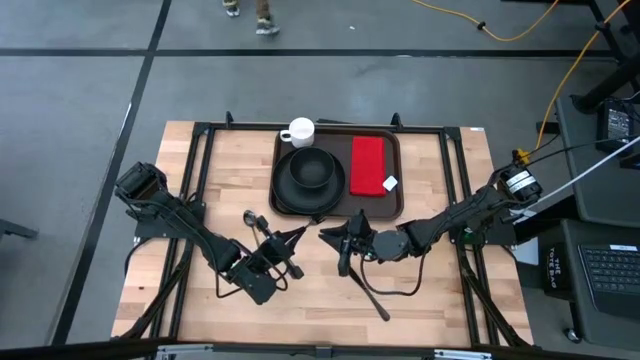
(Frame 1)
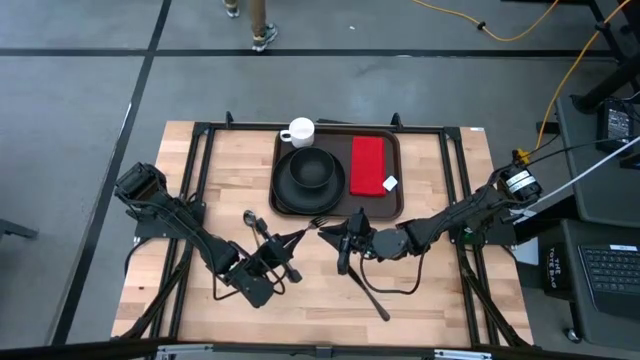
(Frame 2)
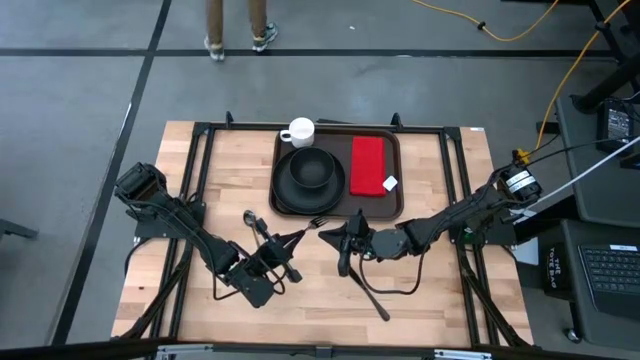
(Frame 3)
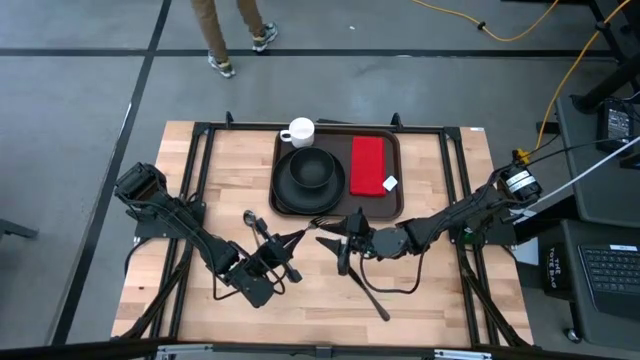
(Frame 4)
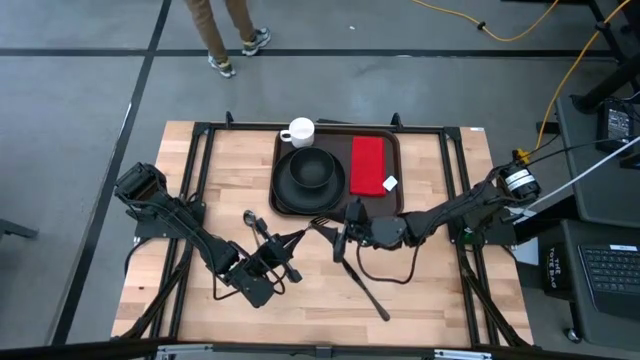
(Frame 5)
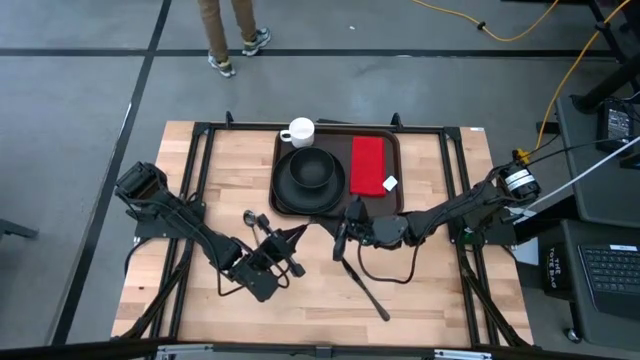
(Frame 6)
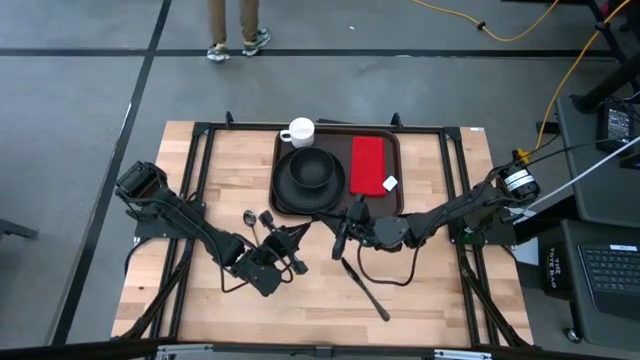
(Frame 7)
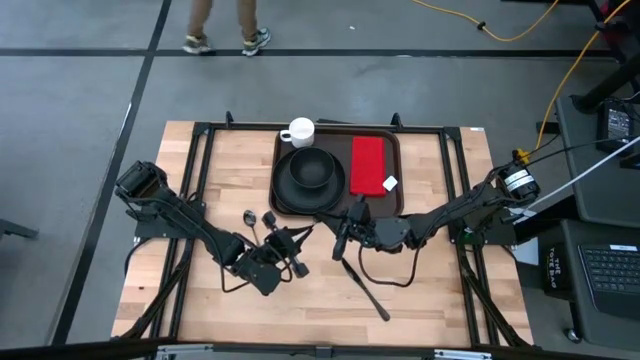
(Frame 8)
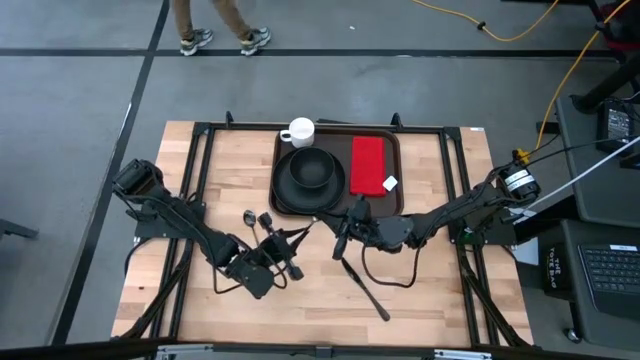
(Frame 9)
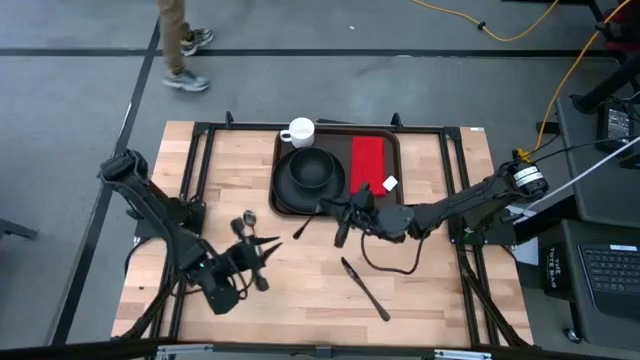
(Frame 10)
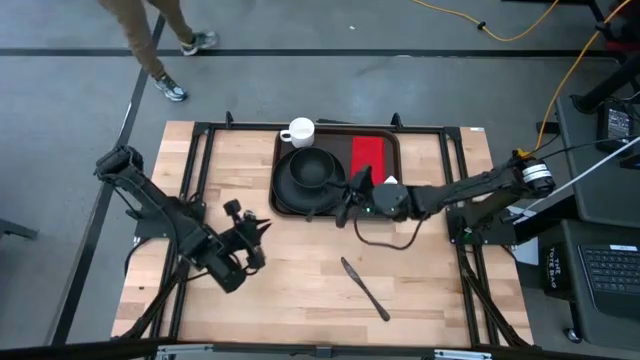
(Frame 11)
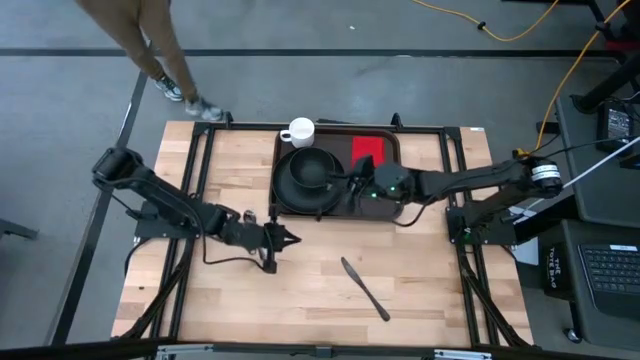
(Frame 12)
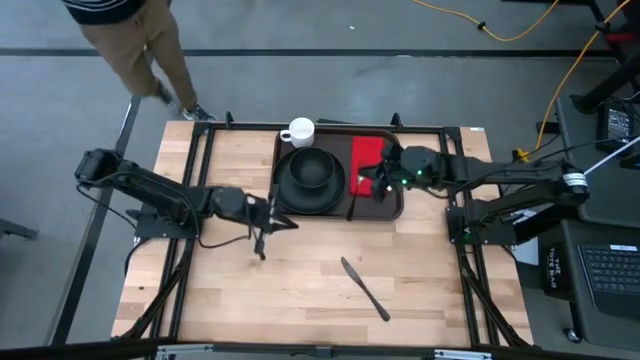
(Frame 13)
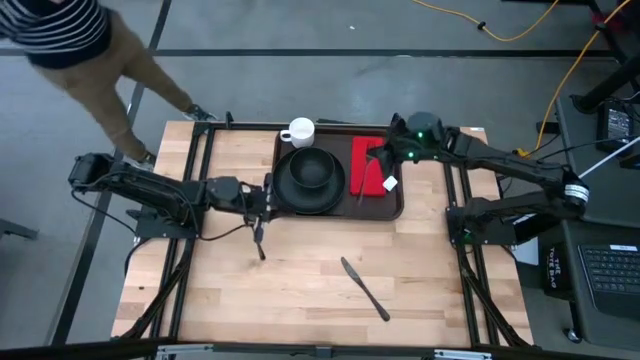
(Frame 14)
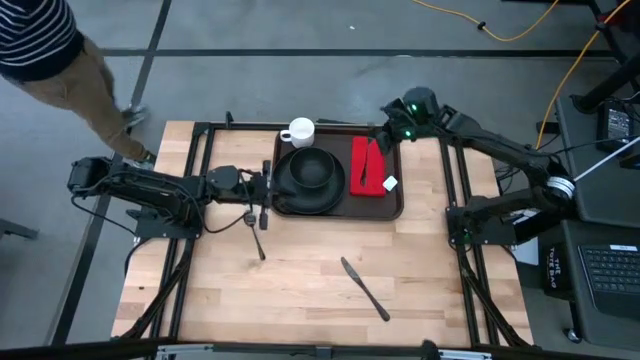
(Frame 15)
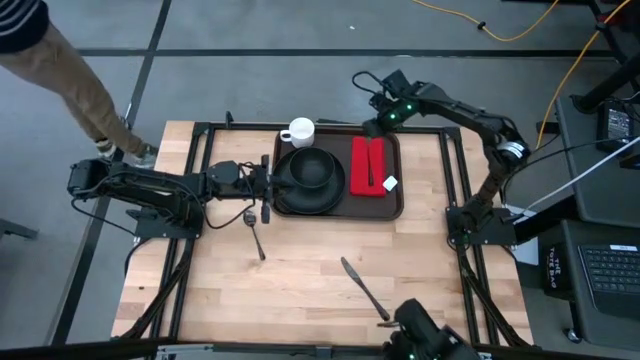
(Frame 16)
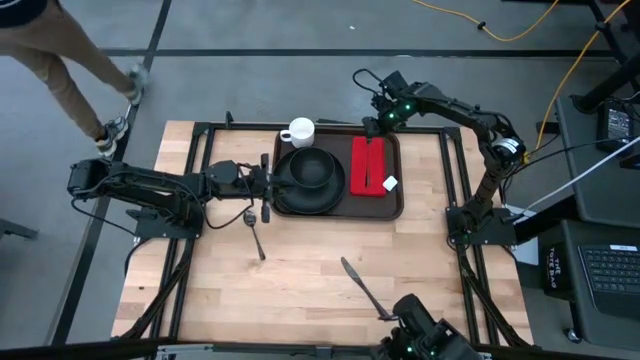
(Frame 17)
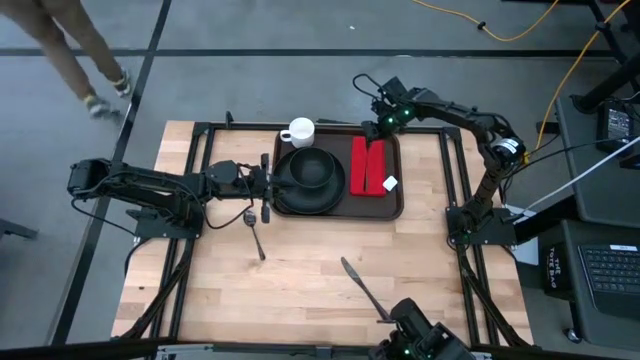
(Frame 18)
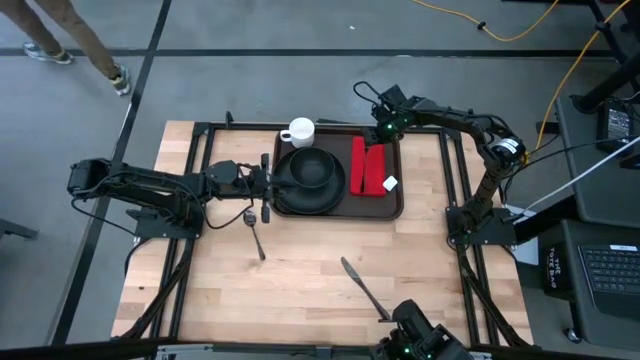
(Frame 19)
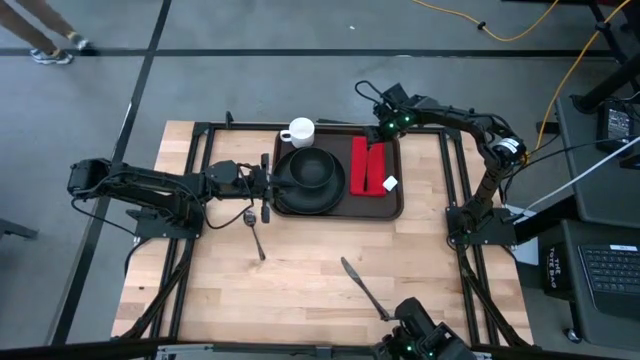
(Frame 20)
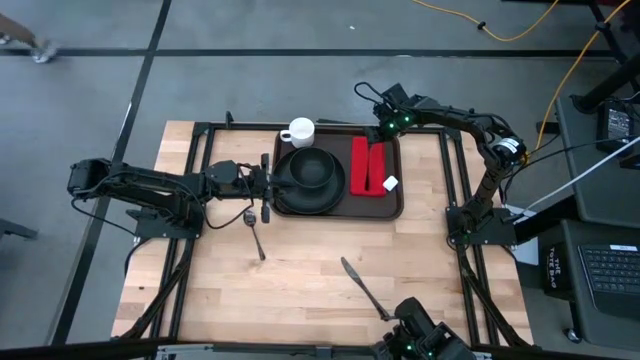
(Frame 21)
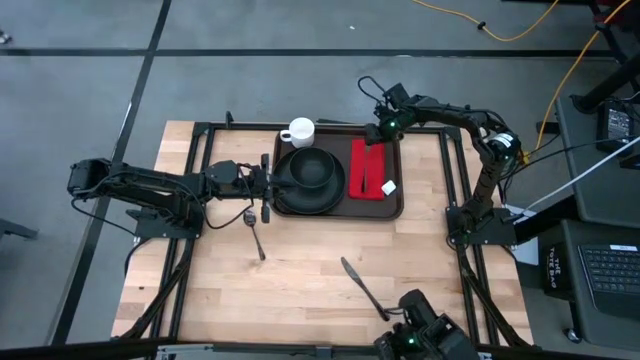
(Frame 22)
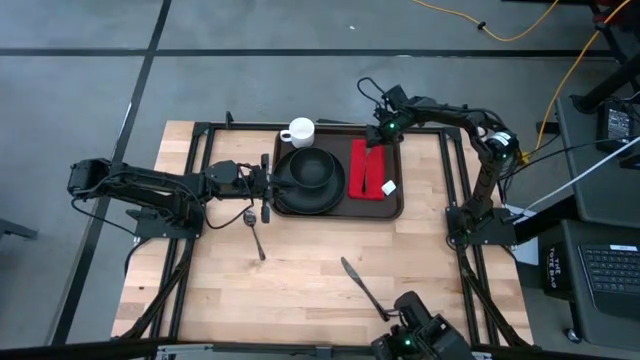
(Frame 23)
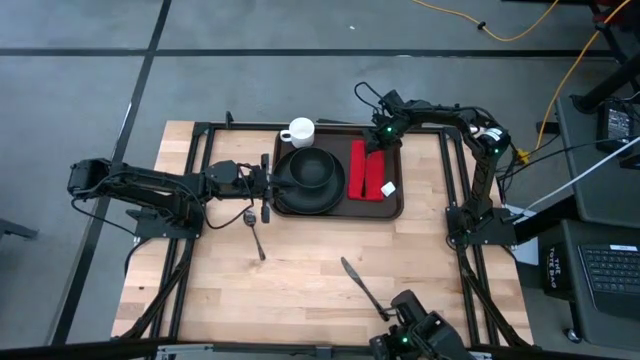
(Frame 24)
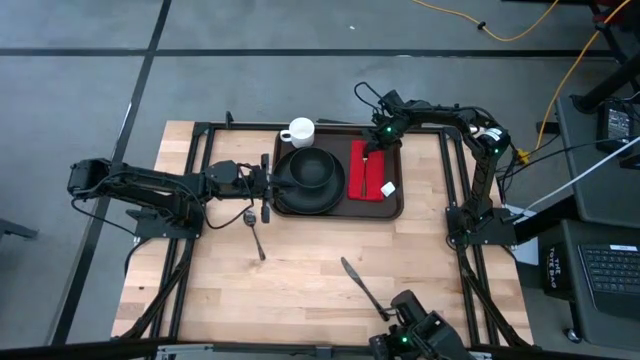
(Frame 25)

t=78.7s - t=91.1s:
Task: Set up tray
Put the black fork on the red napkin on the brown serving tray

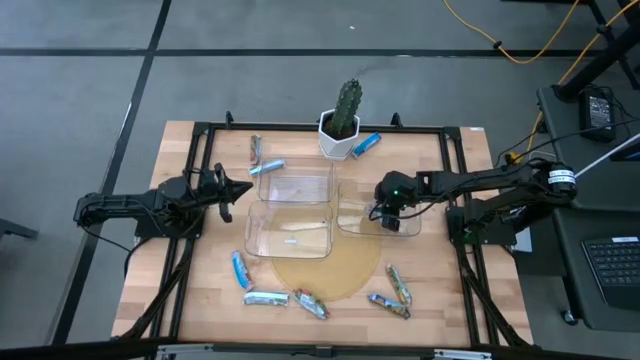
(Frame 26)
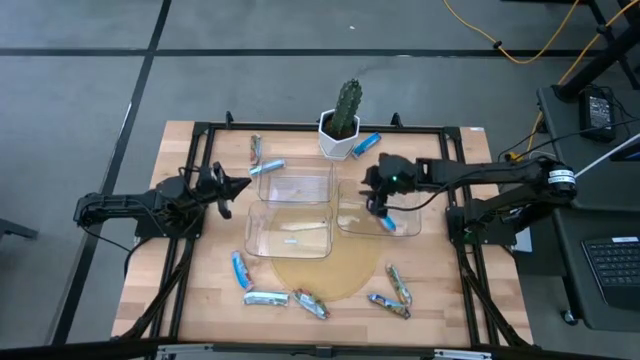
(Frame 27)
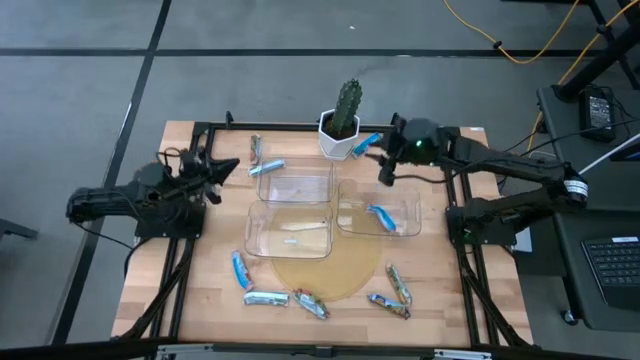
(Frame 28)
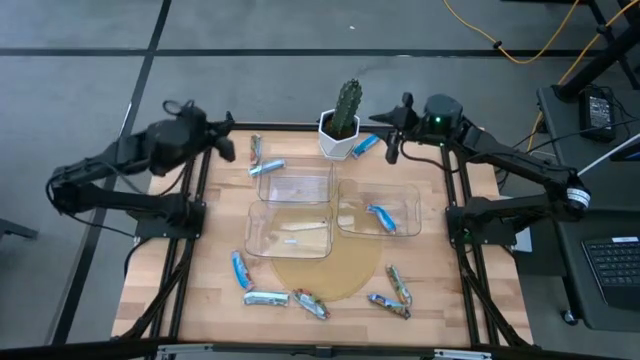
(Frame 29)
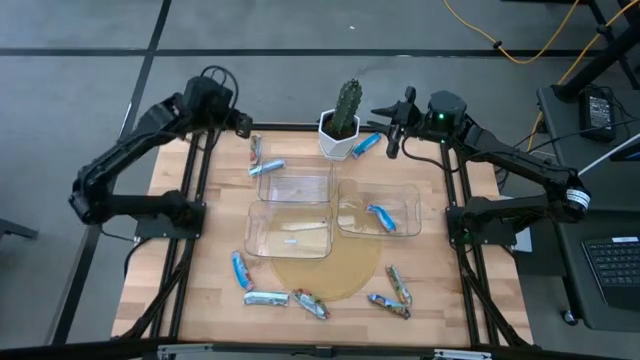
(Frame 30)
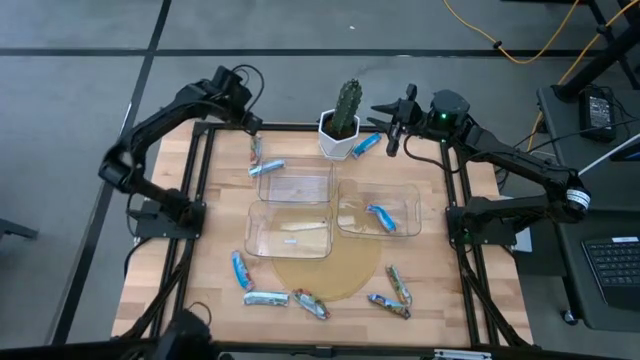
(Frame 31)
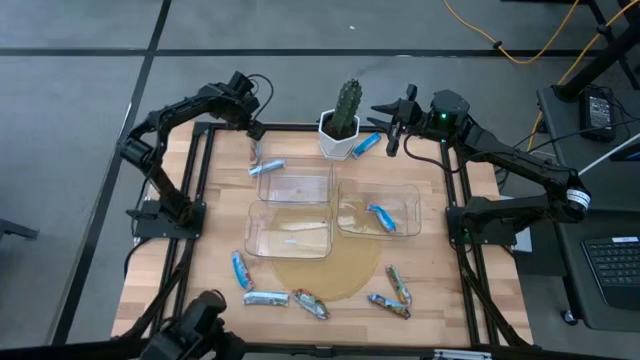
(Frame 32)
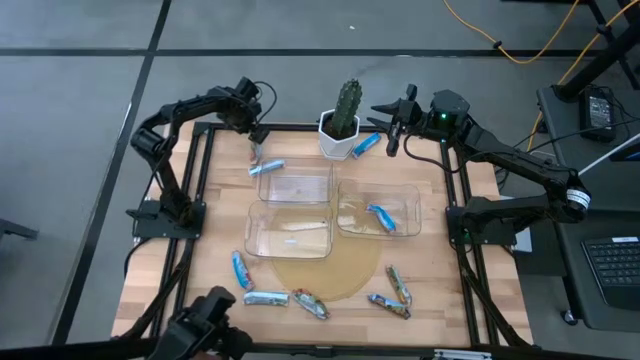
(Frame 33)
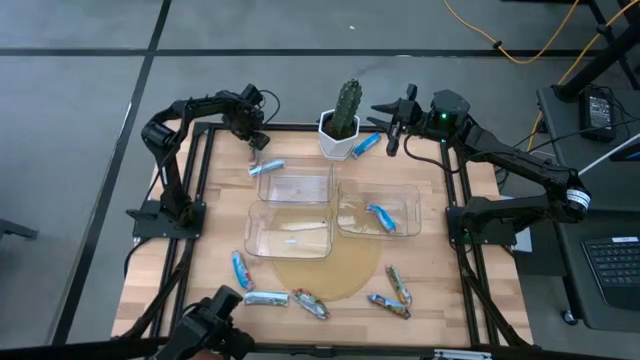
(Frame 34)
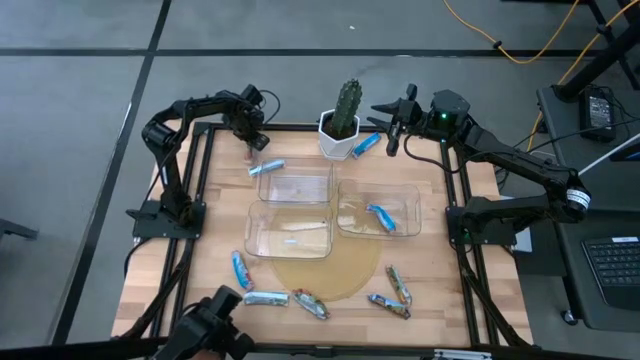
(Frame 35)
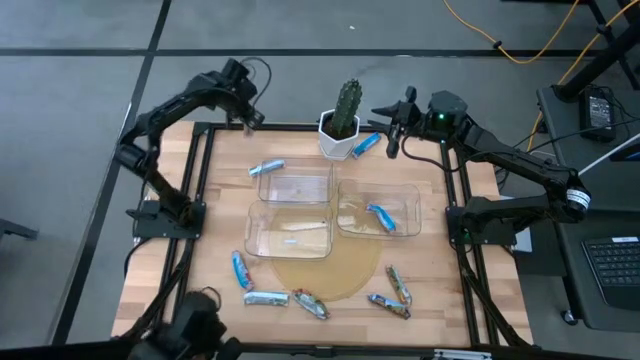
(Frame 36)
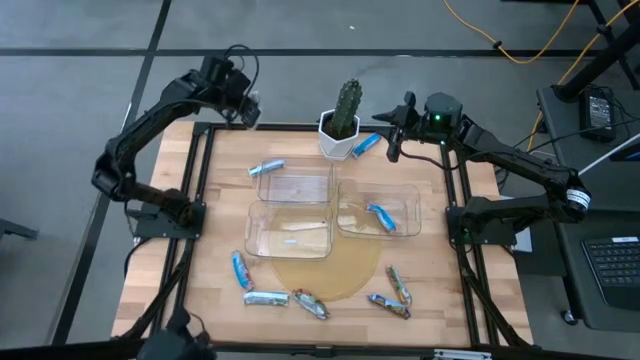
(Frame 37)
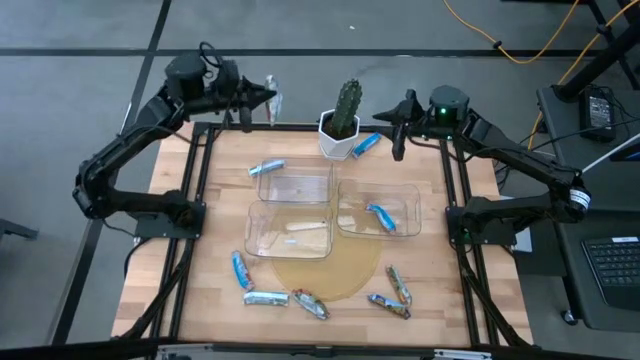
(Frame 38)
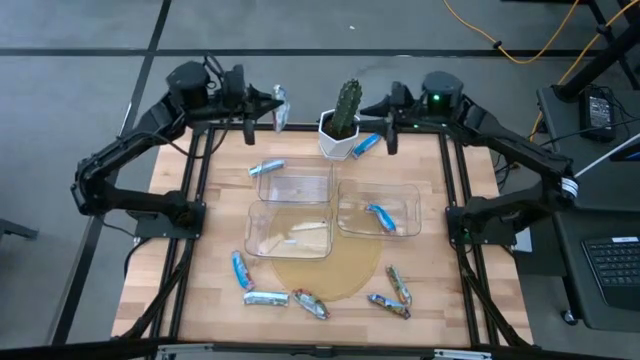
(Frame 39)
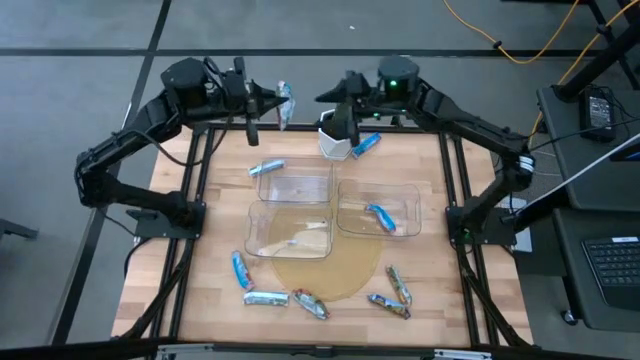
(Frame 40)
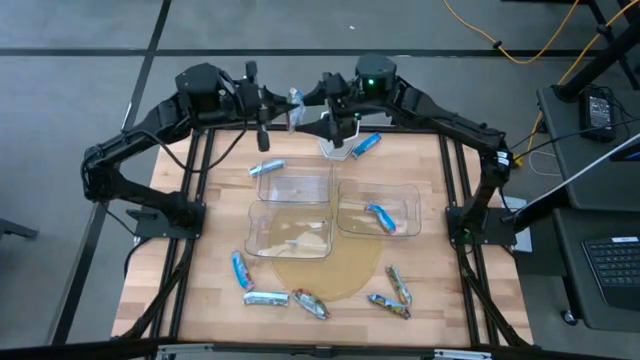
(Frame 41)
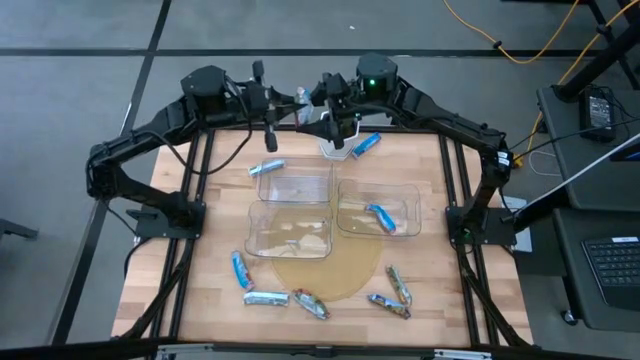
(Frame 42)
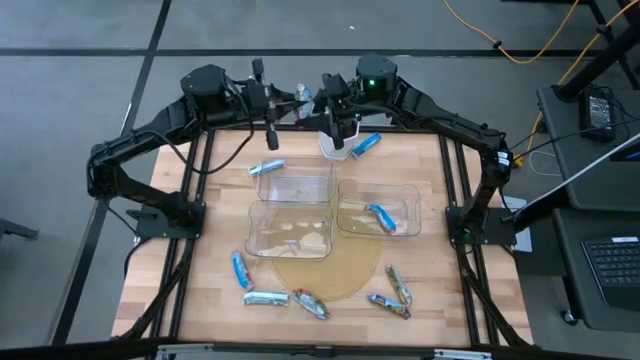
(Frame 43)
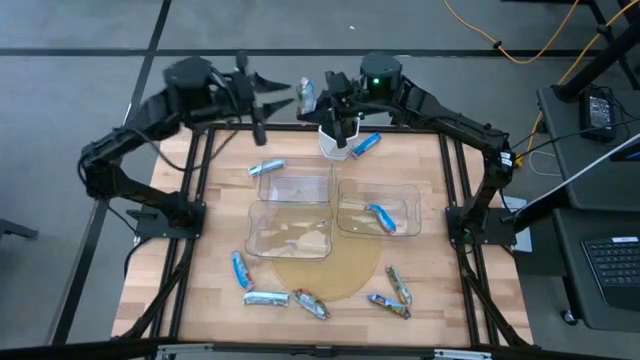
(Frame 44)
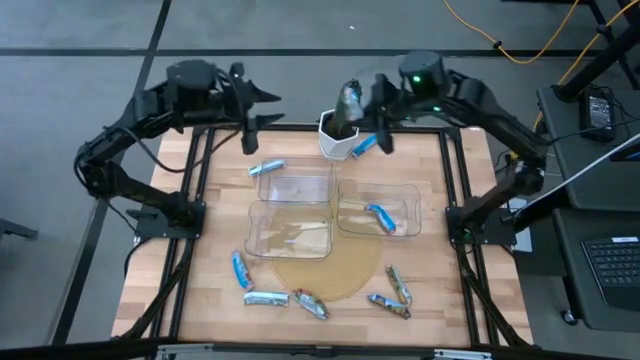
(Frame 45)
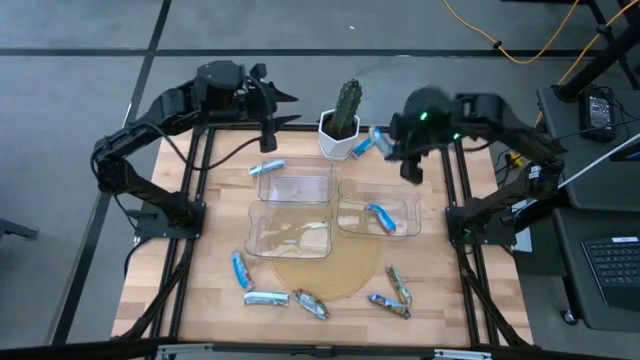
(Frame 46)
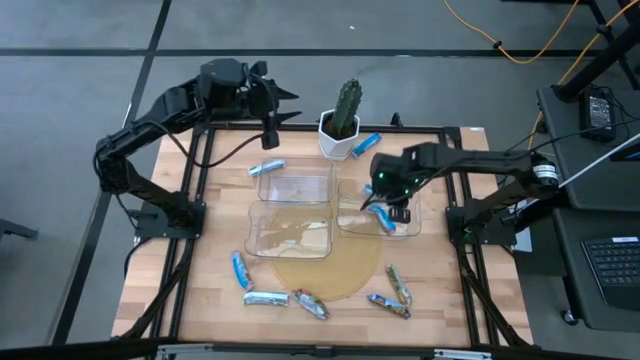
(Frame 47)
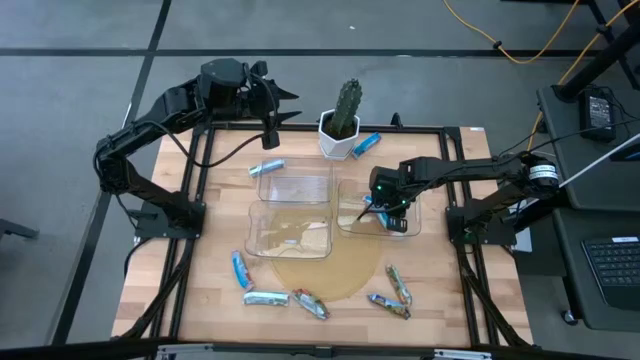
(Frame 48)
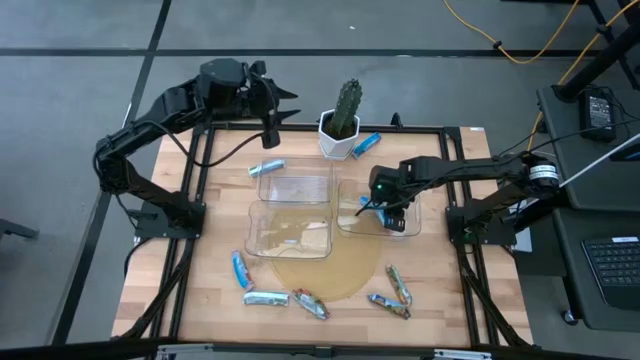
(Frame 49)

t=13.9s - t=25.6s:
Task: Pick and place Granola Bars by type
Put the top red granola bar into the right bin
